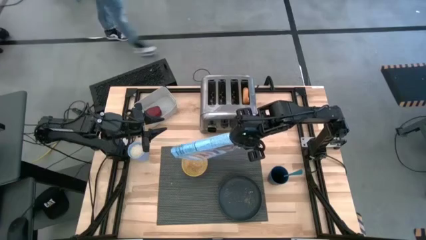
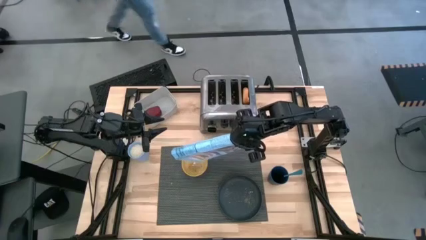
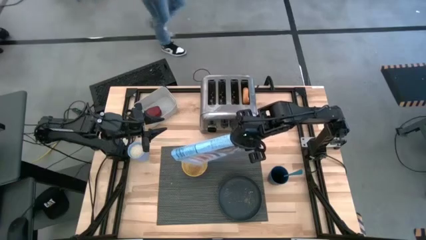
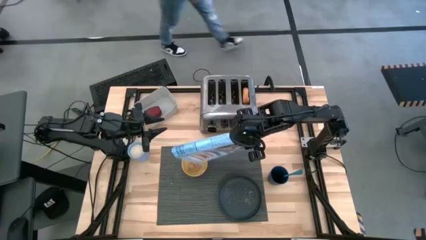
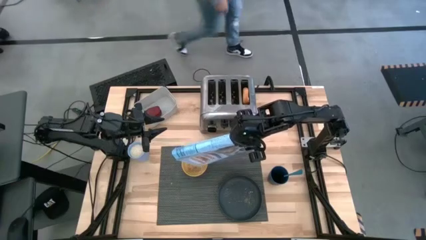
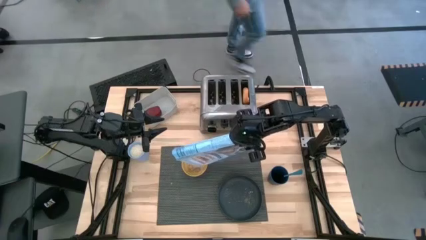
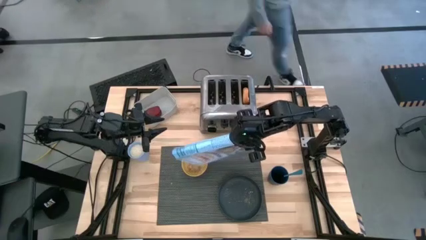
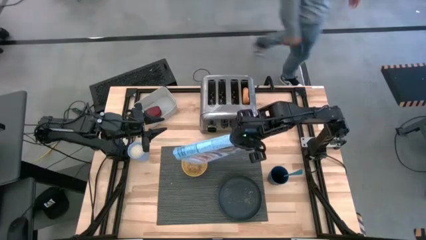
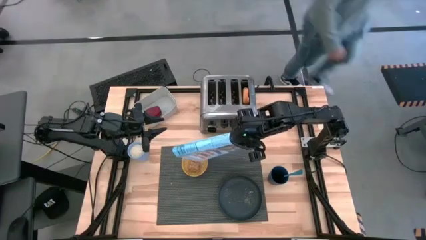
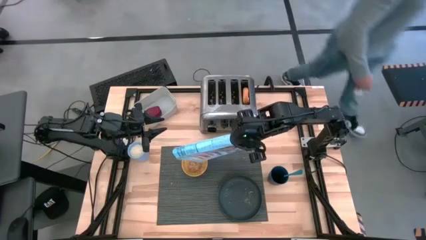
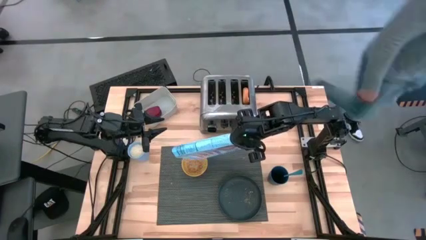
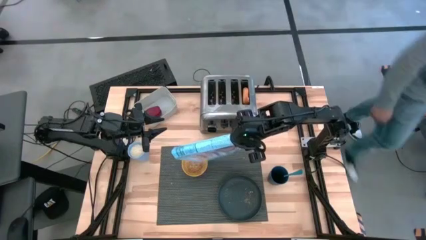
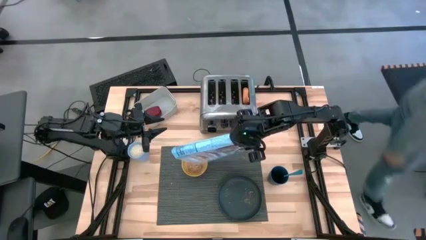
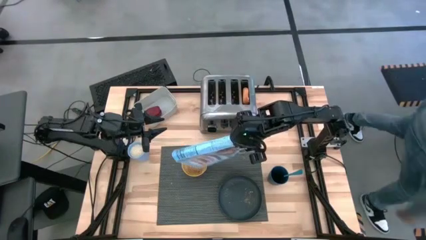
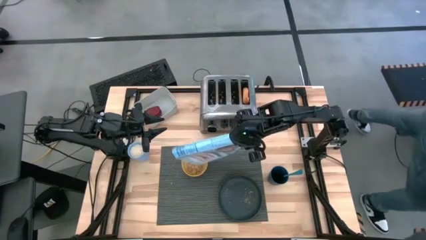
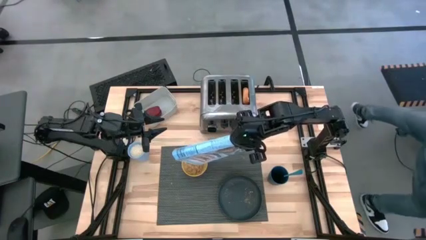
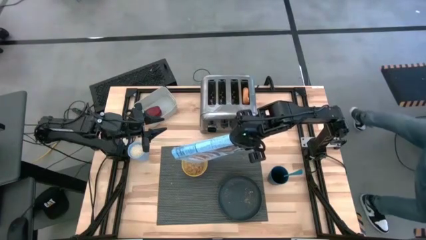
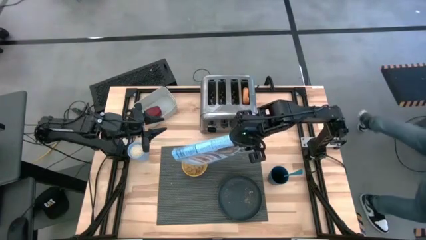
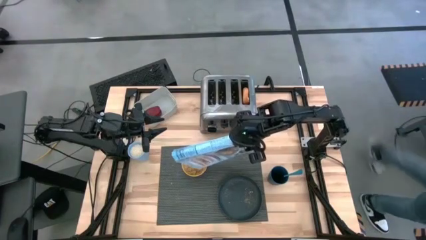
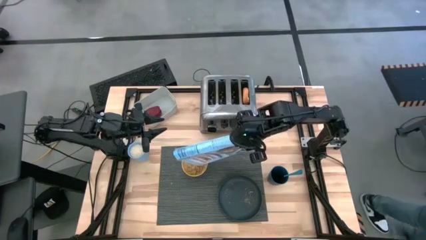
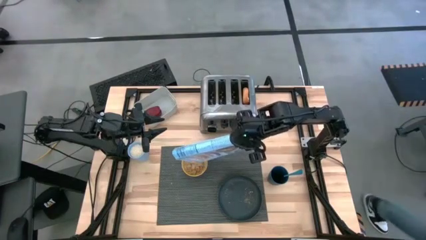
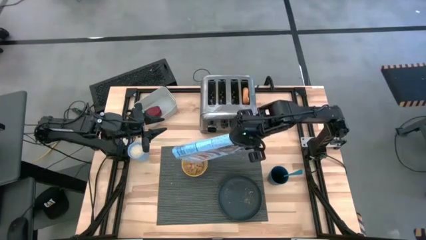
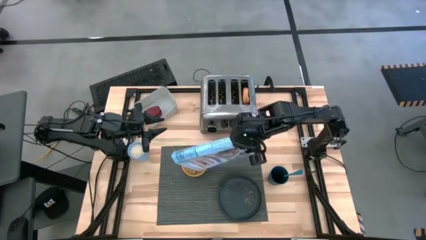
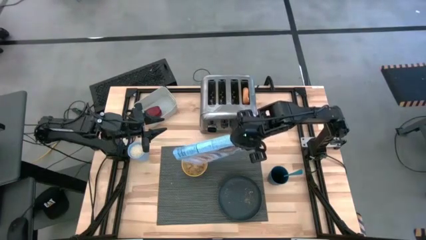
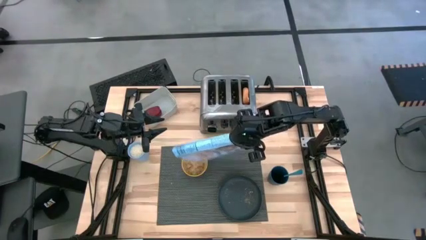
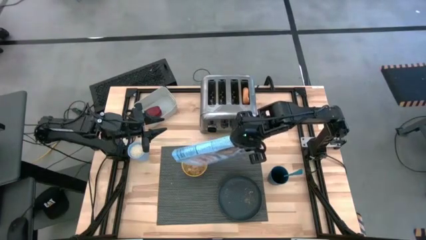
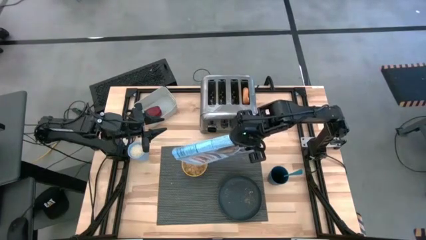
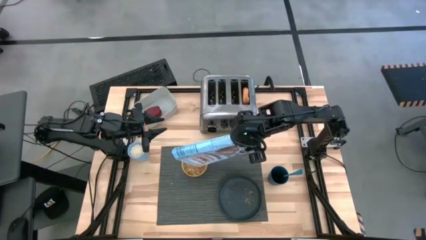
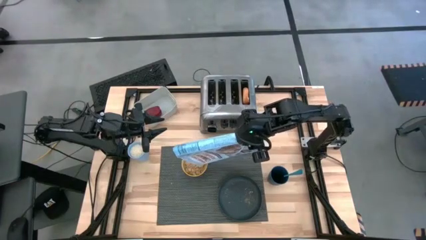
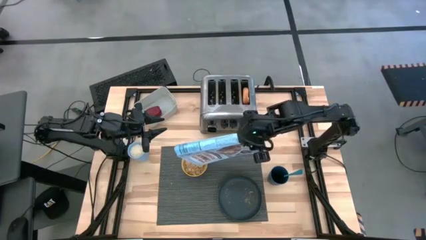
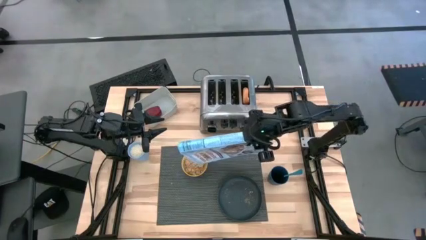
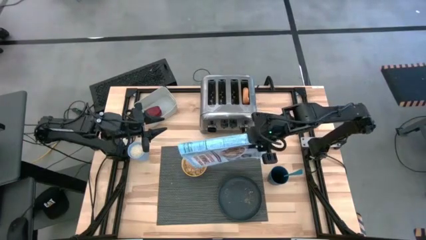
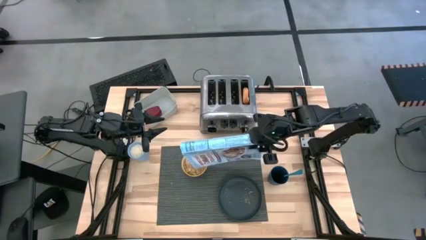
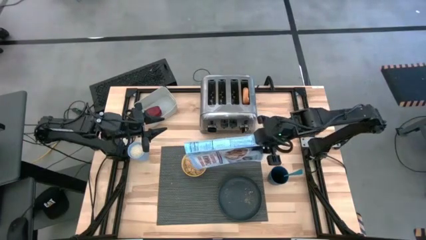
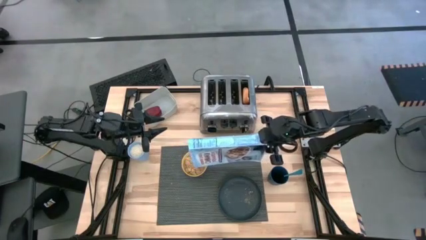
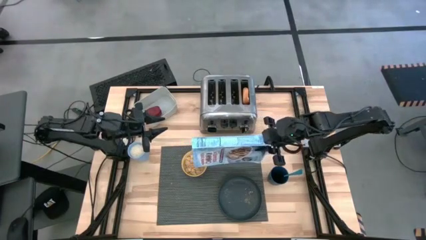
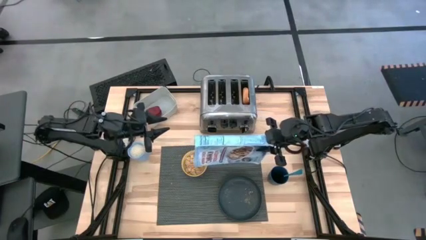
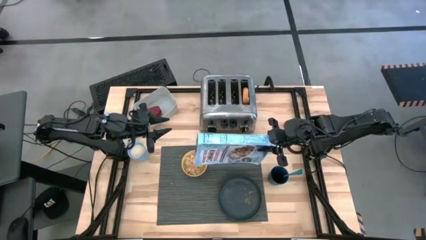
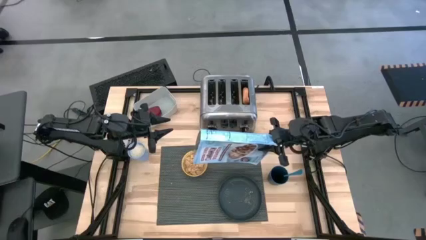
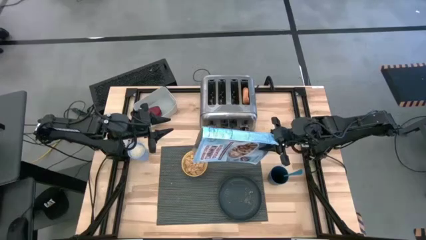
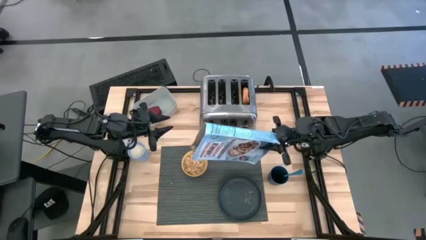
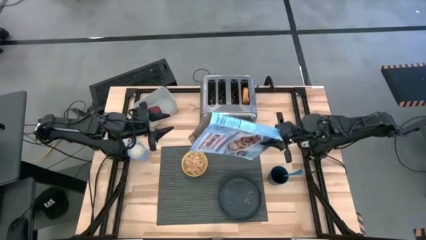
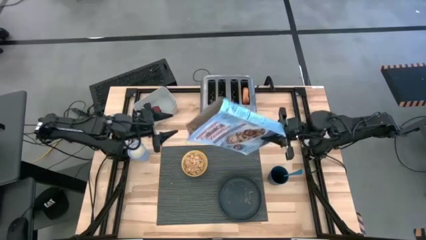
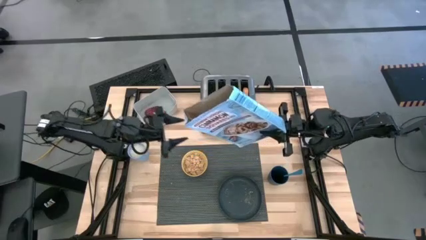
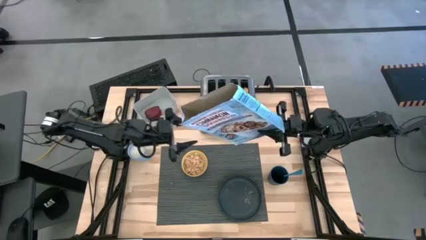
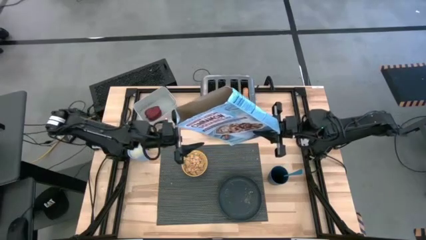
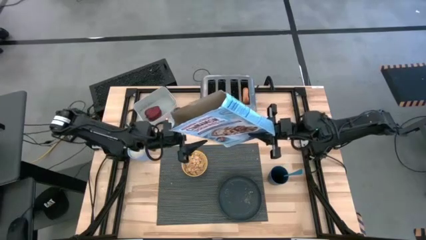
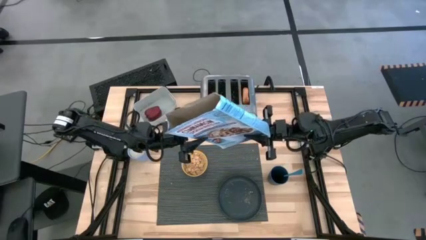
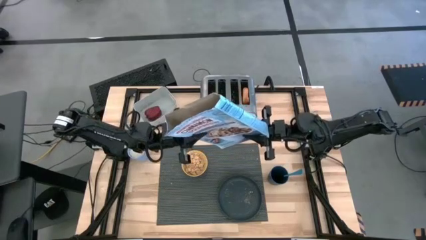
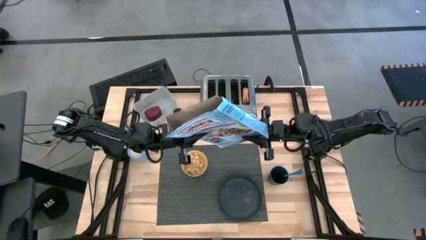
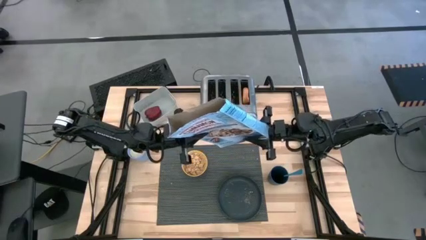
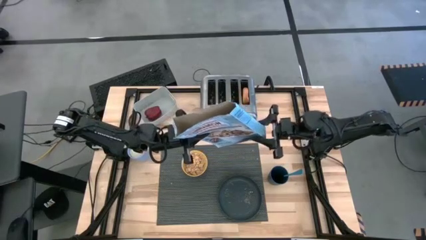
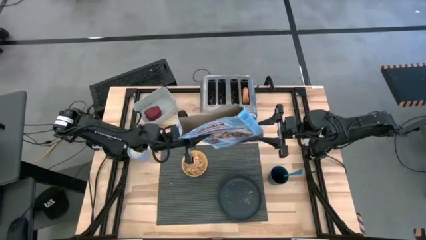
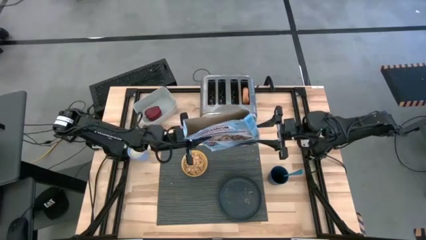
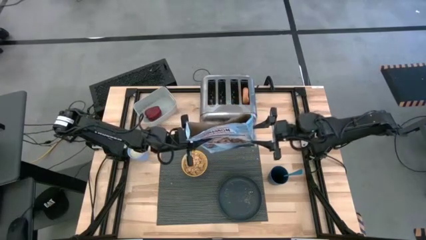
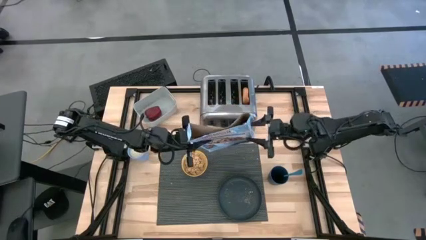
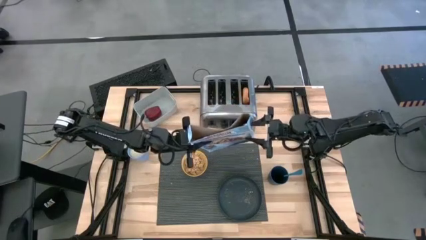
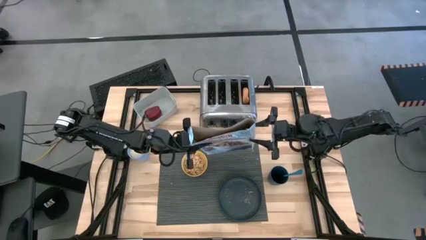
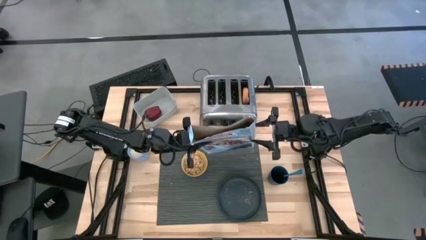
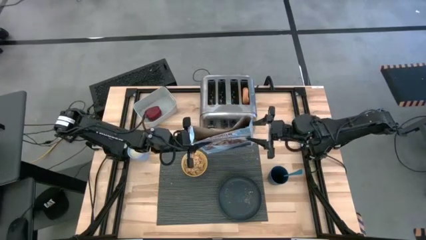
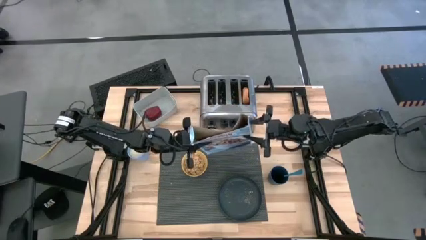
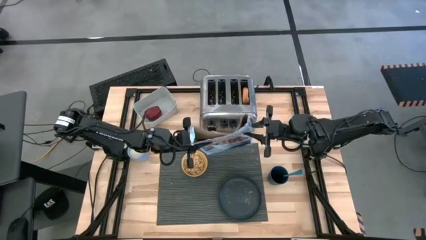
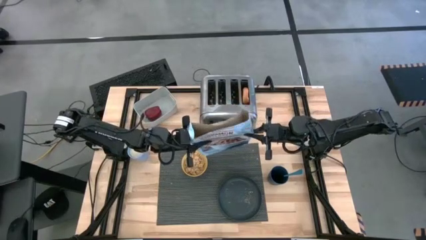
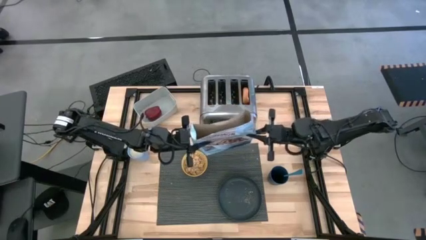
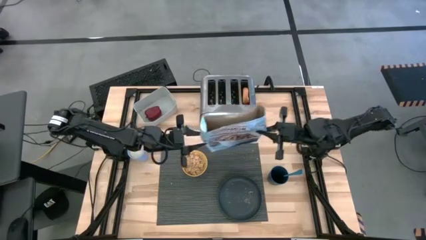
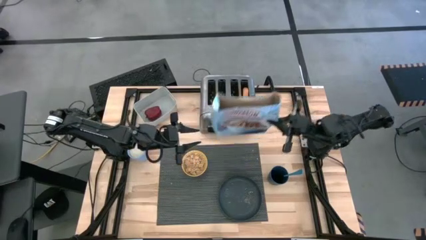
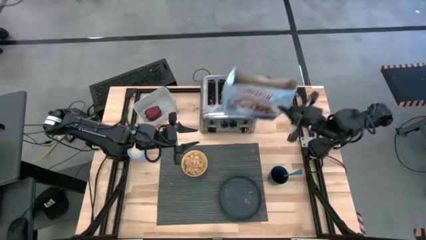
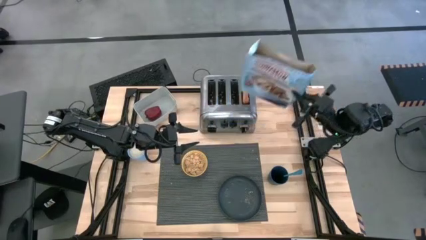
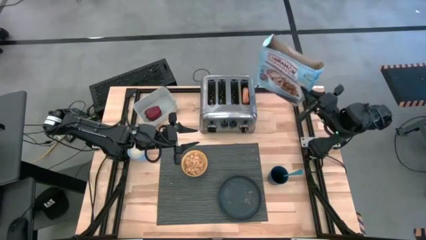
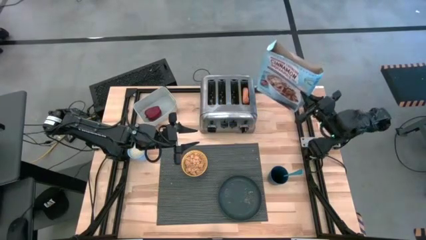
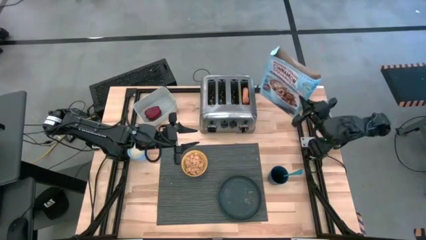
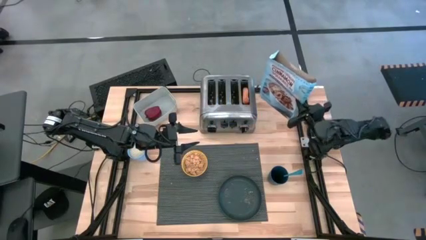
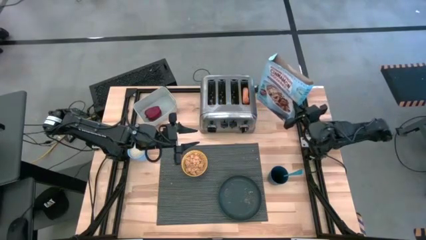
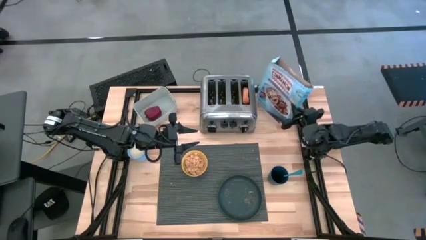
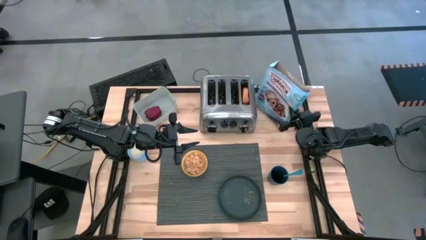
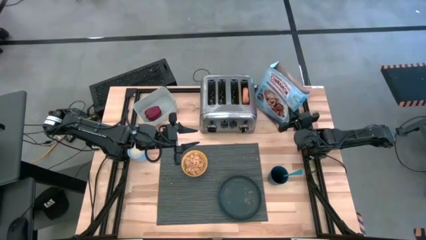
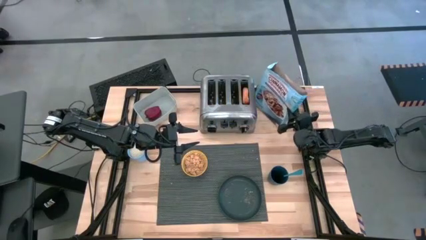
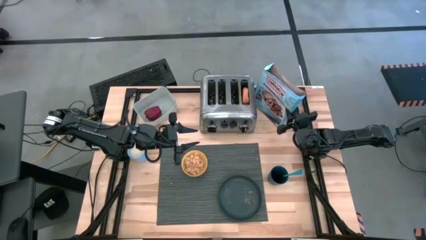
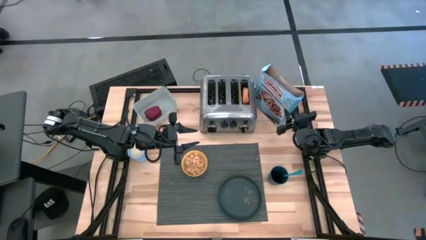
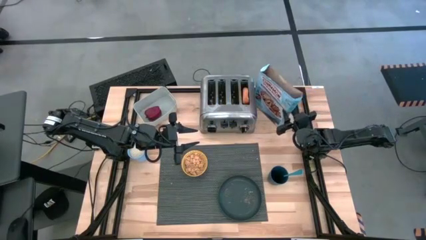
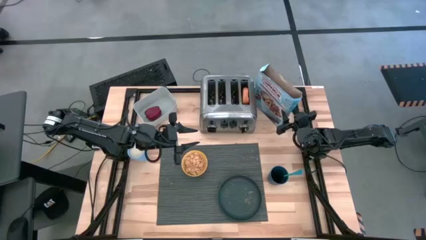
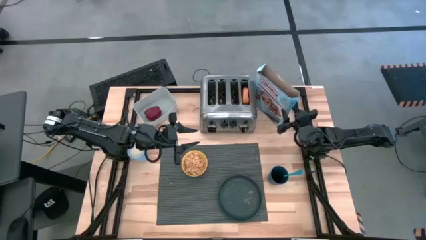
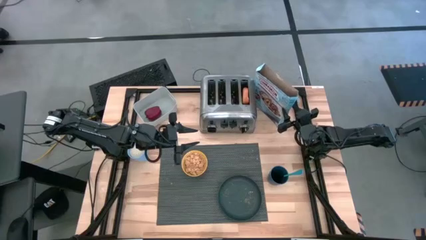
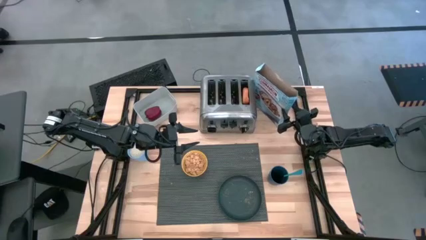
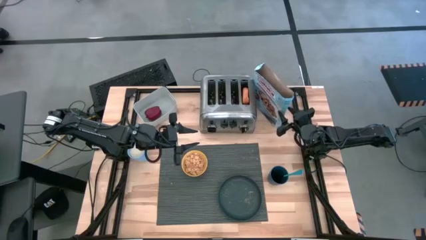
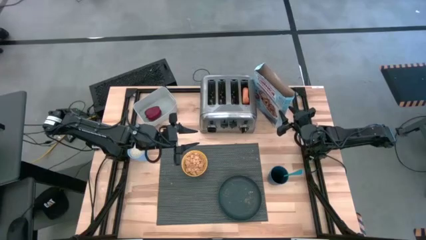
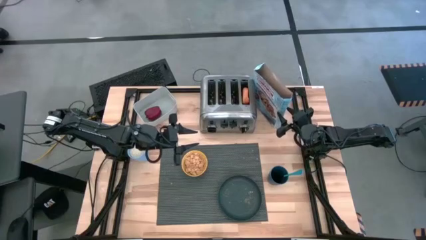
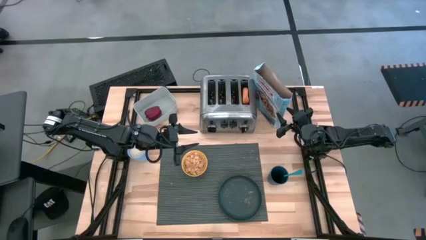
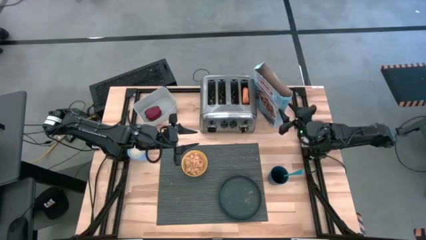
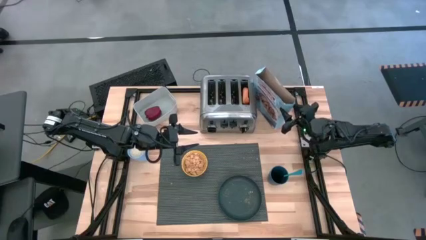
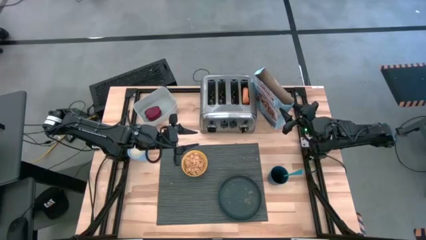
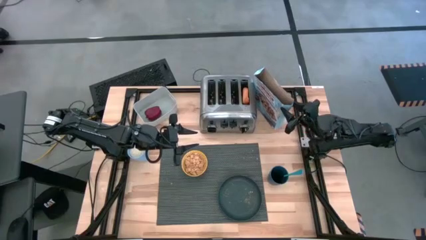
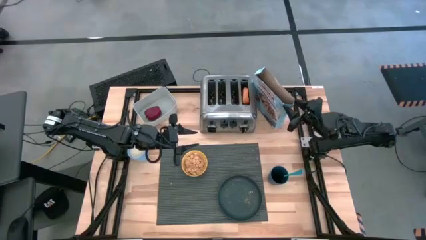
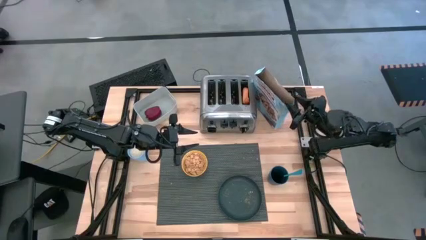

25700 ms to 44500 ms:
Task: Arrange a breakfast setting
Pour the cereal from the blue cereal box into the yellow bowl
